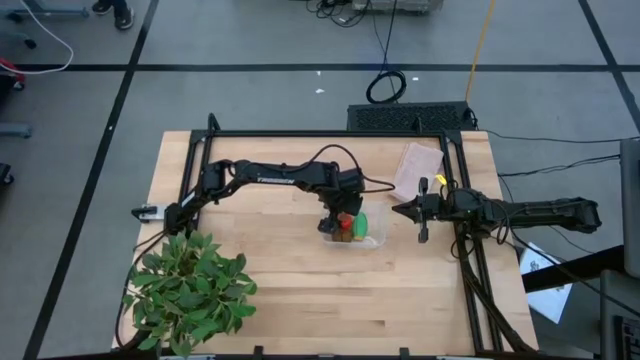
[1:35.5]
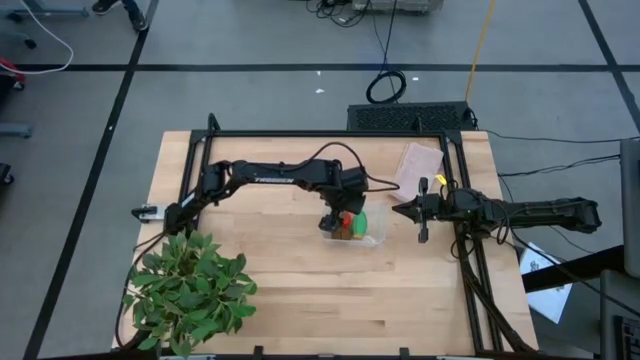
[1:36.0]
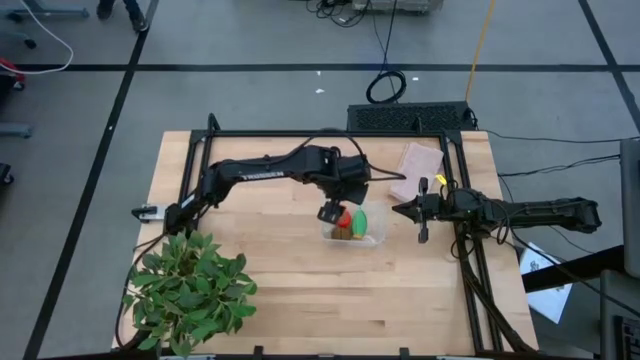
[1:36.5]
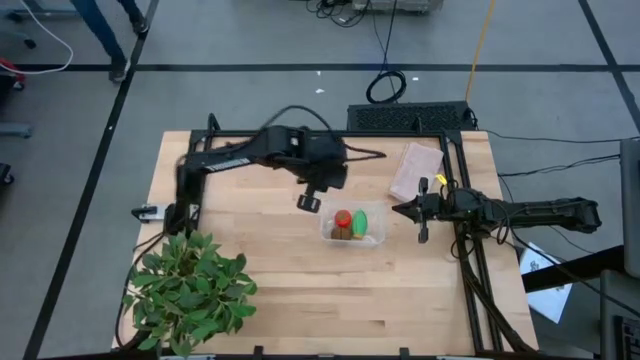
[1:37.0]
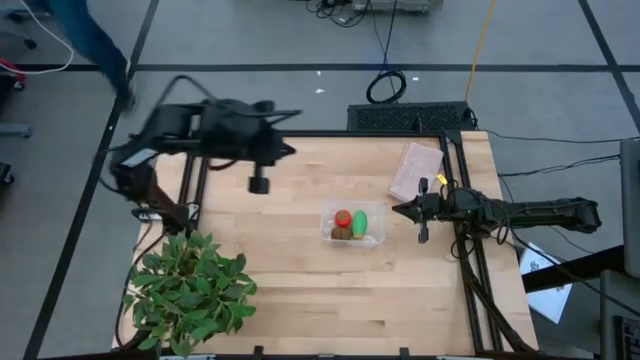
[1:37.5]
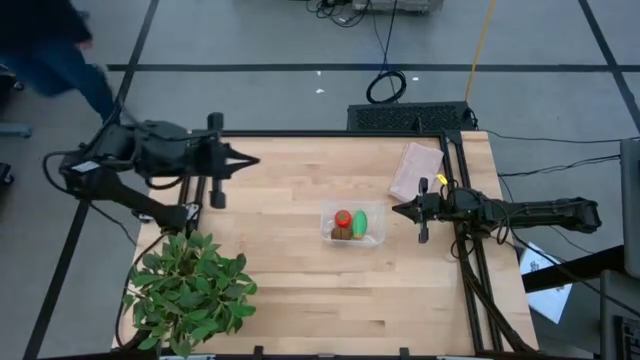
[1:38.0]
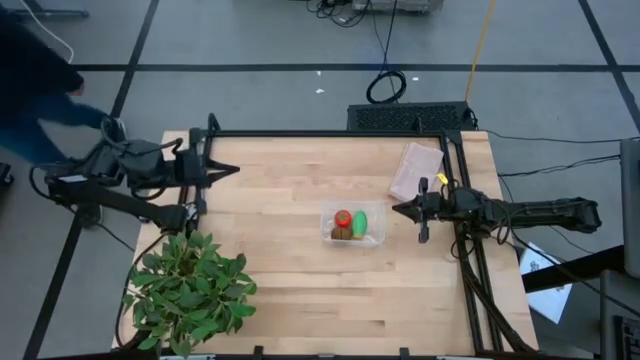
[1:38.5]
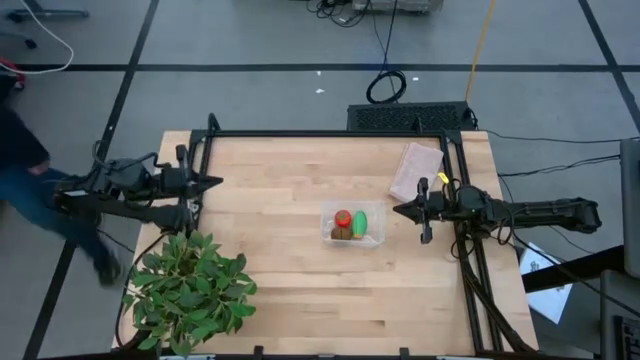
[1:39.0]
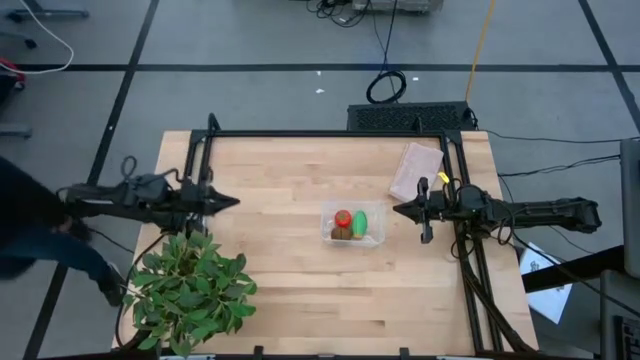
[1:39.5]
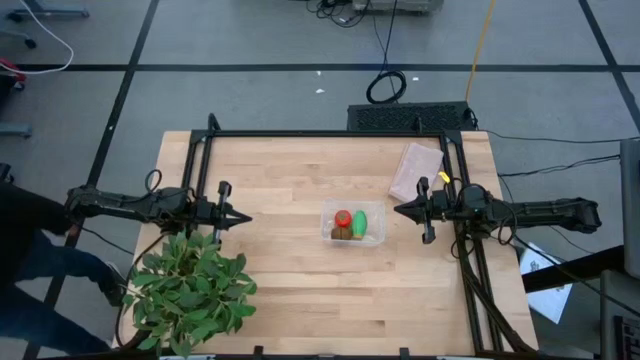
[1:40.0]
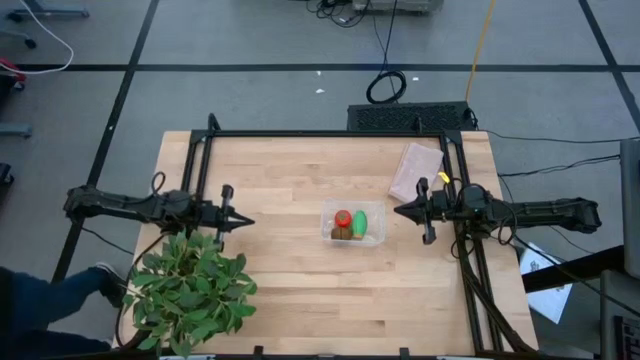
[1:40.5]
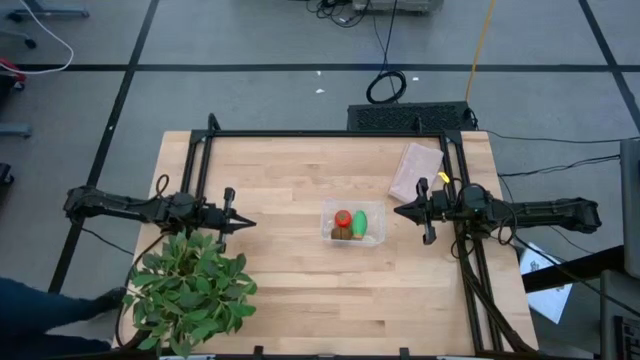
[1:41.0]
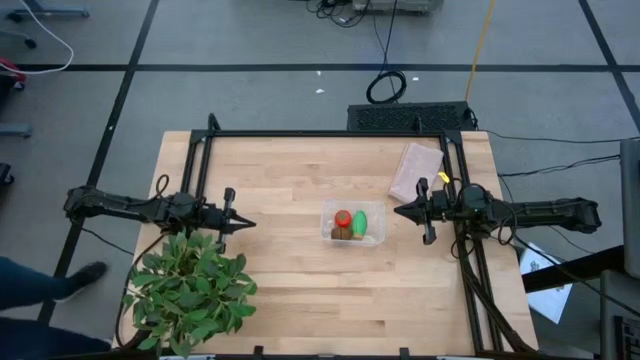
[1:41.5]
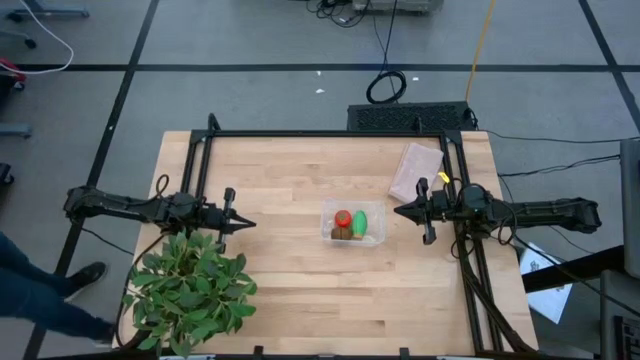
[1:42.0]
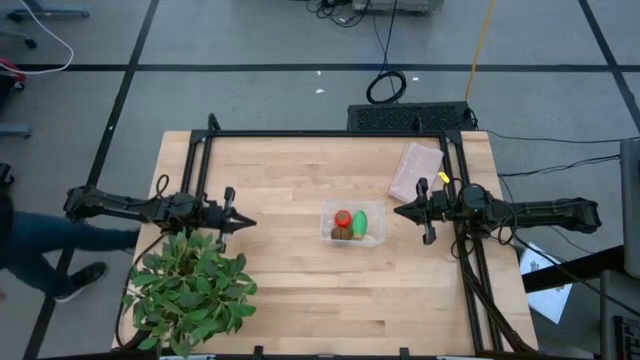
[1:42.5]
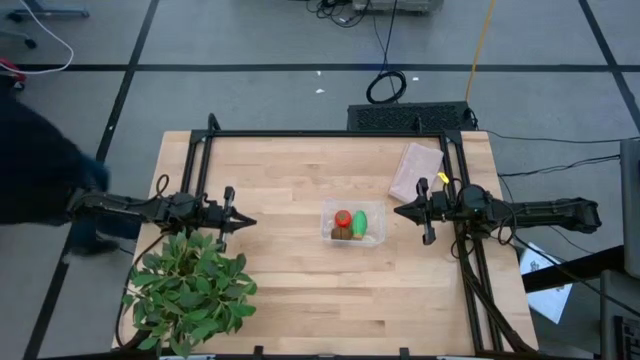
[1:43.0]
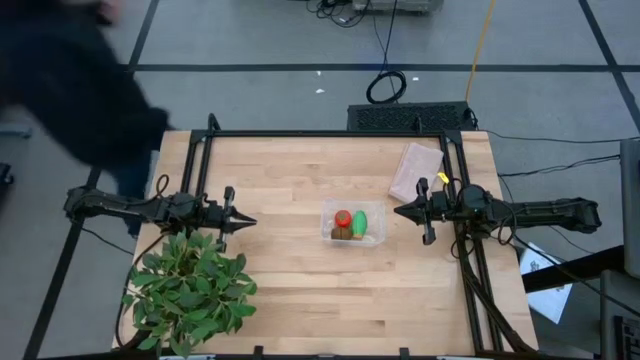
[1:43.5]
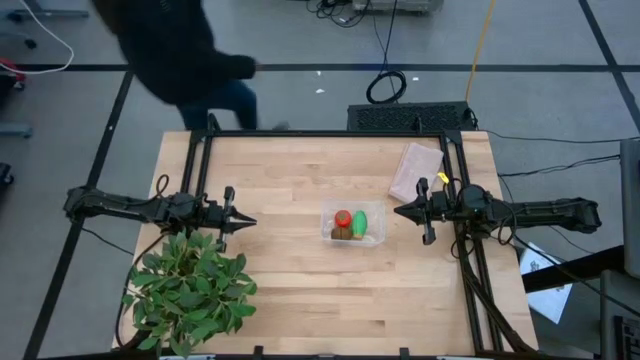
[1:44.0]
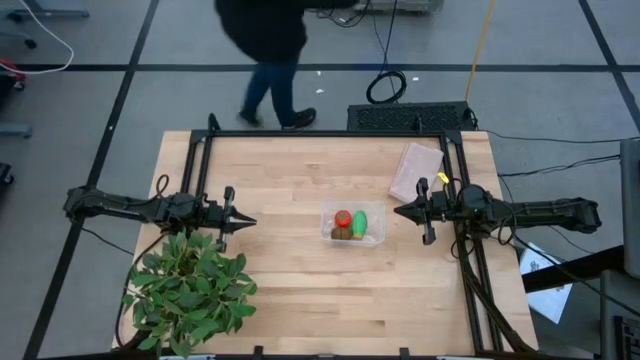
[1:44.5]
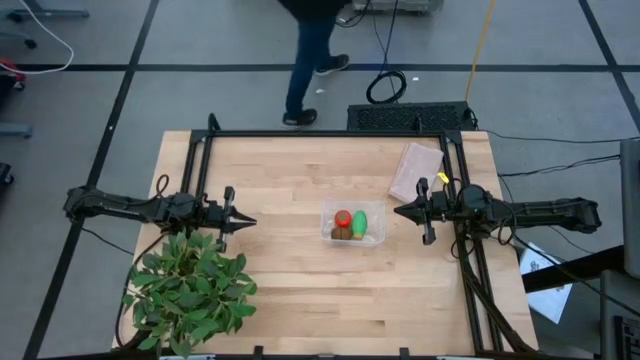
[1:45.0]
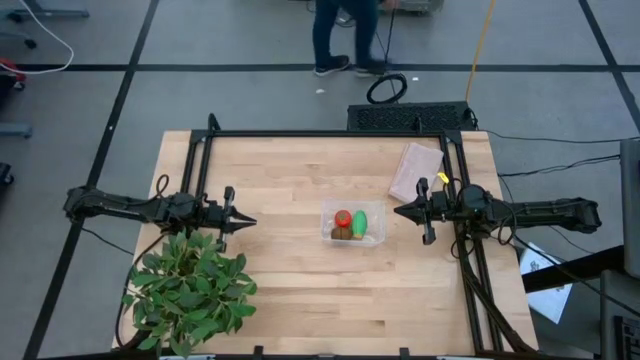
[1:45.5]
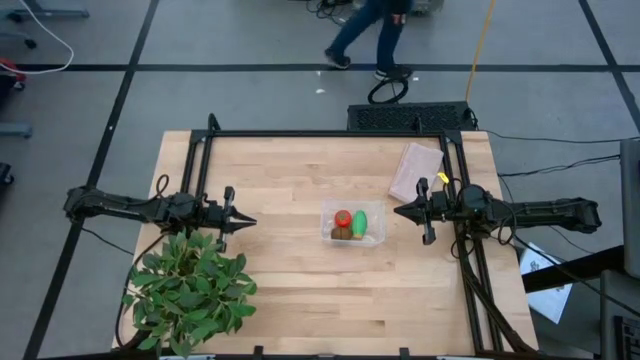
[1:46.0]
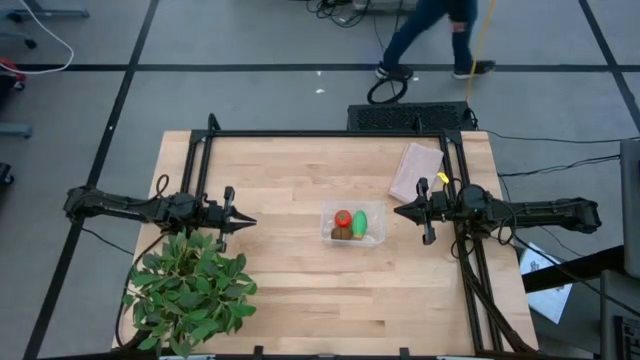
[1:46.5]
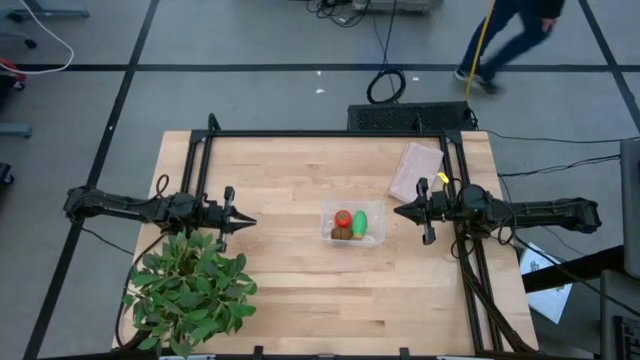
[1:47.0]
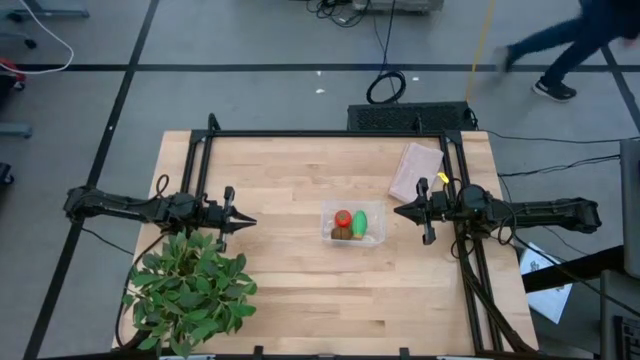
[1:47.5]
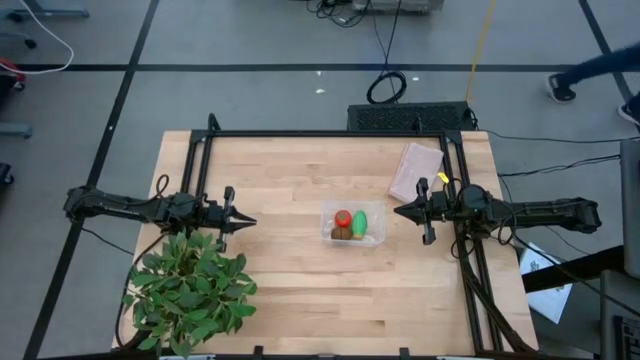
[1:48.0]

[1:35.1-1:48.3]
Task: Pick and placing Produce into tupperware
Return to Home Position

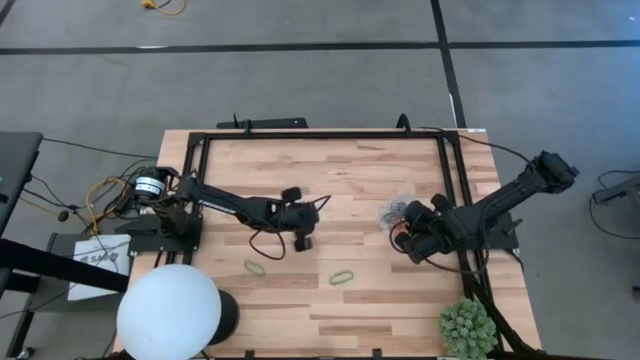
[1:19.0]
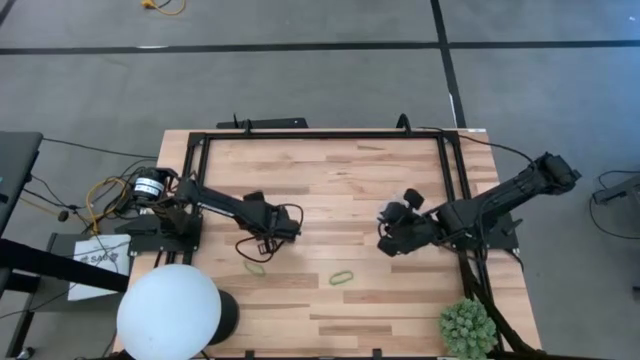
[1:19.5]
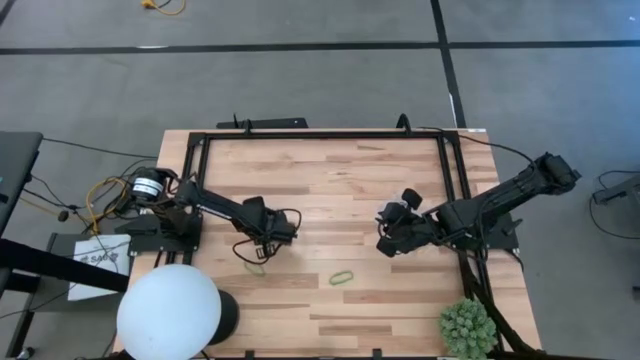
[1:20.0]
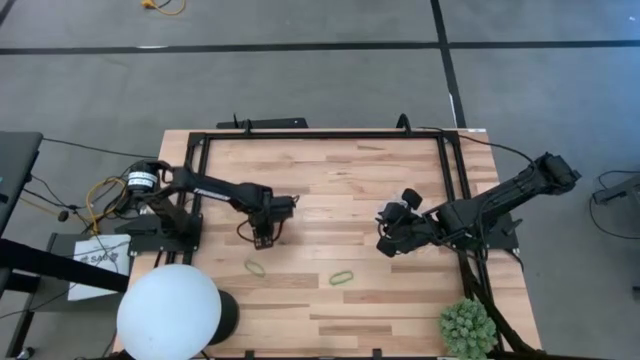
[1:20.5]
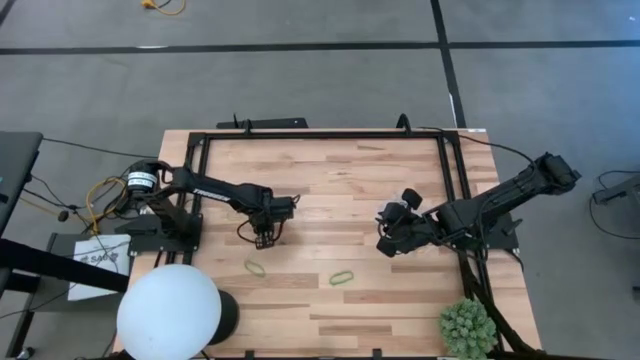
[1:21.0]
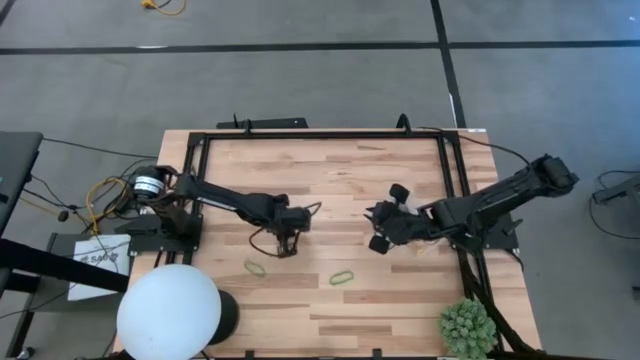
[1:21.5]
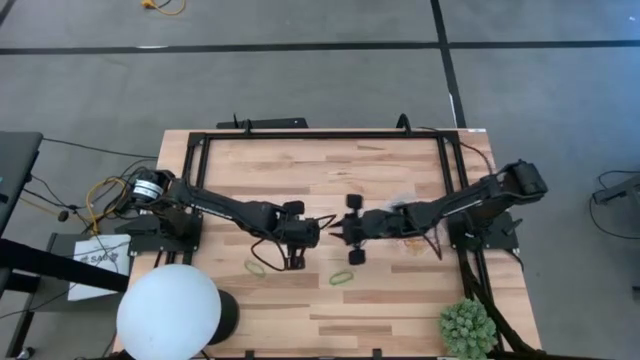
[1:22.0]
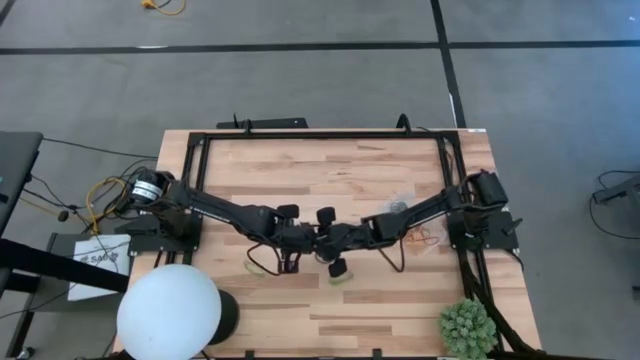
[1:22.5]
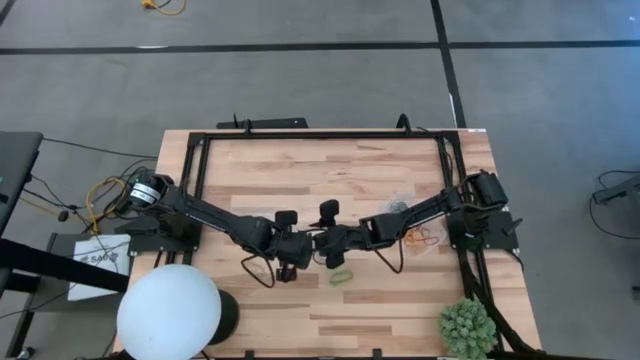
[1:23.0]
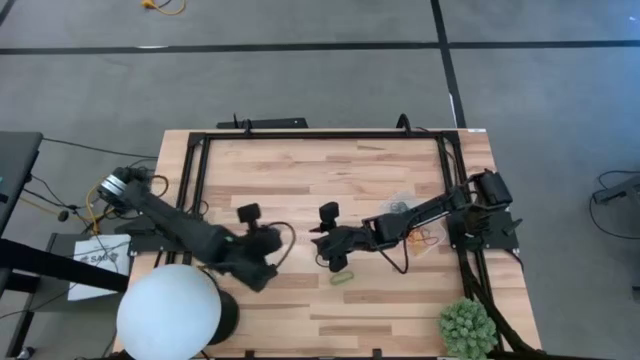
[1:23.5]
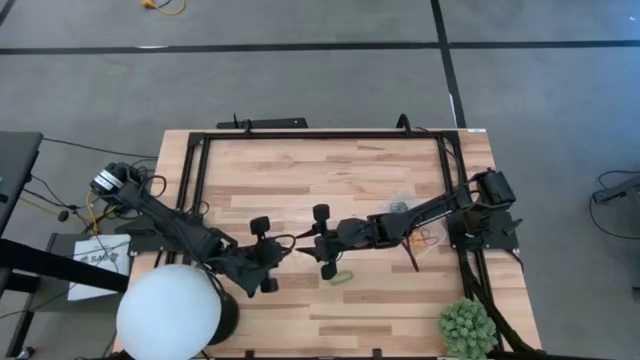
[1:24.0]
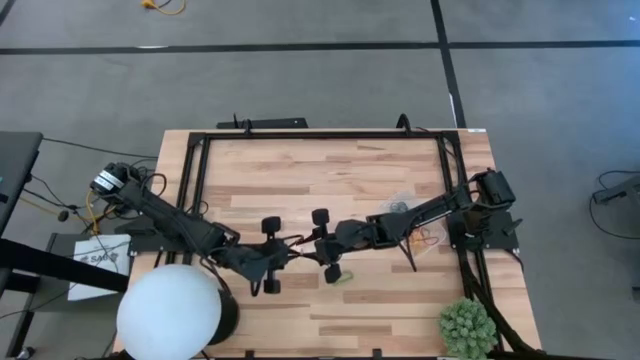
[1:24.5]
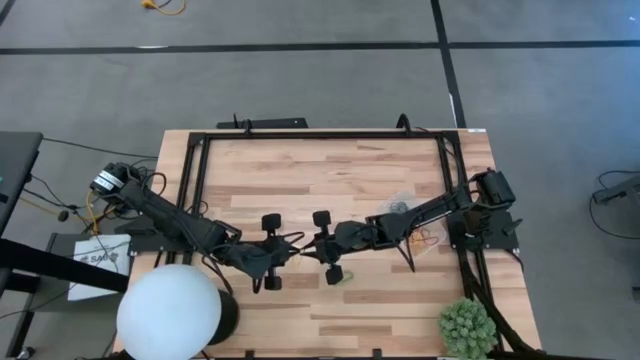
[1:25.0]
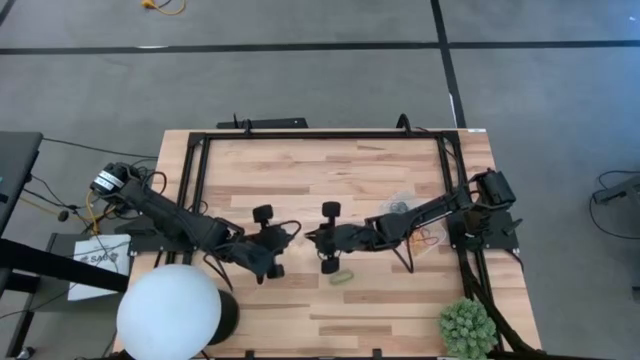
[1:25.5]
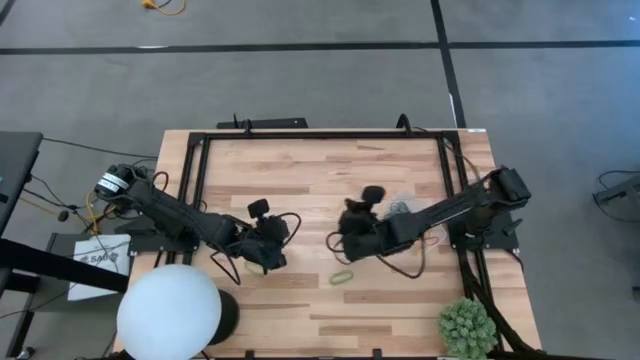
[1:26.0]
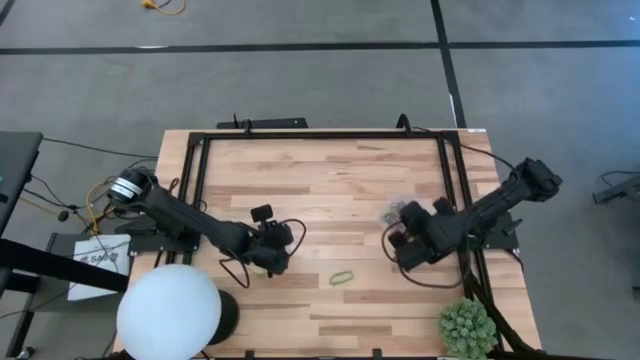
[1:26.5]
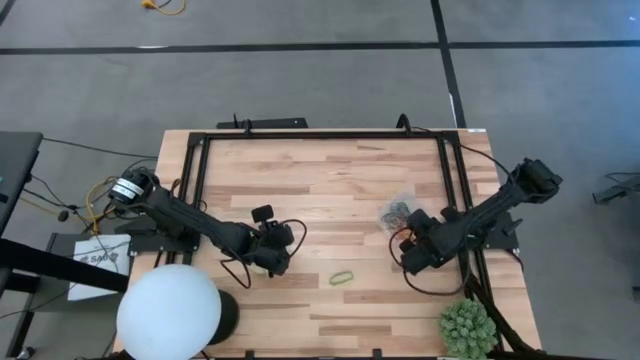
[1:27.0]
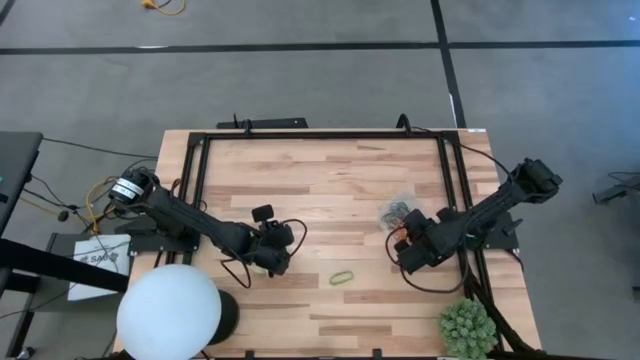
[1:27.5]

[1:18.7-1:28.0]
Task: Pick and place items into bin
Put the yellow rubber band into the transparent bin
